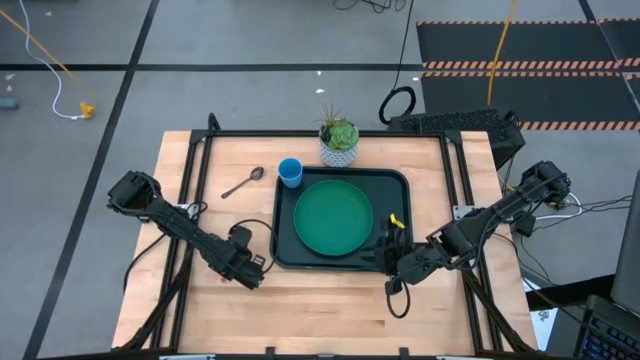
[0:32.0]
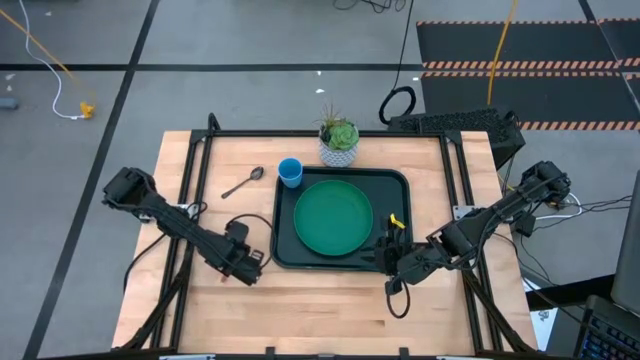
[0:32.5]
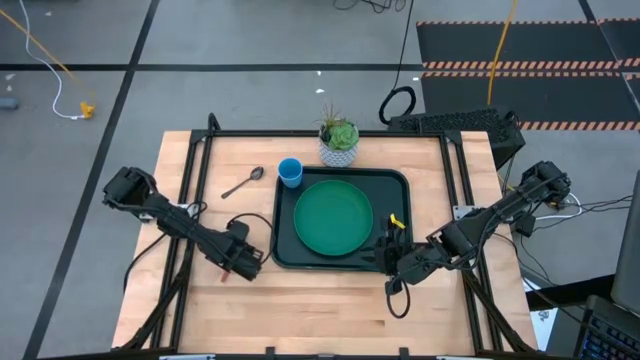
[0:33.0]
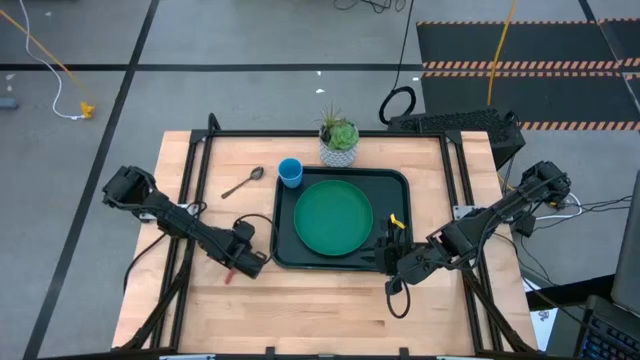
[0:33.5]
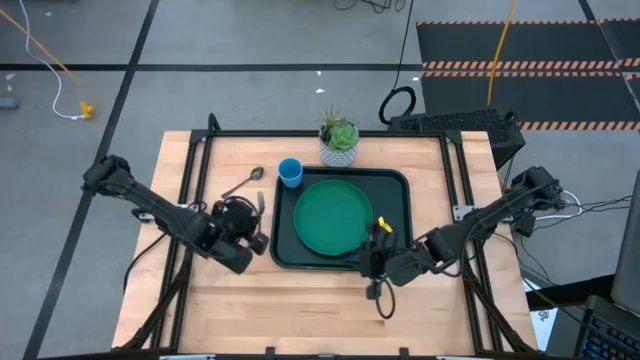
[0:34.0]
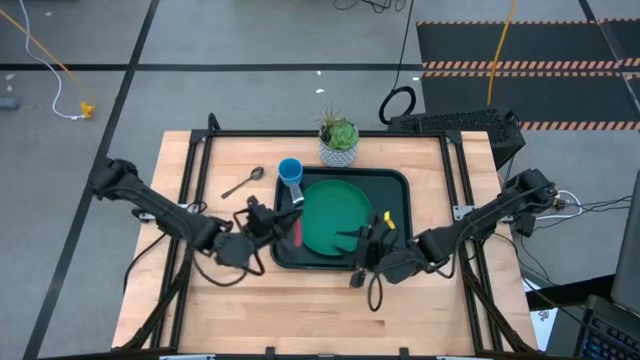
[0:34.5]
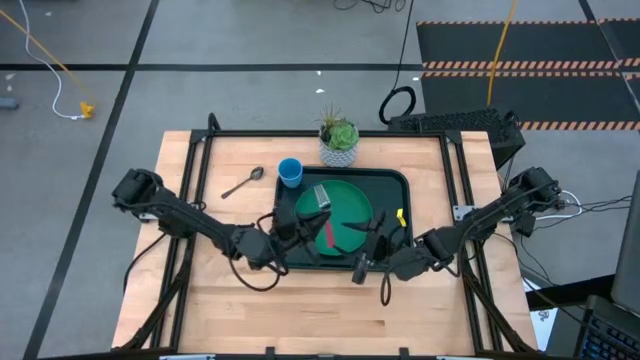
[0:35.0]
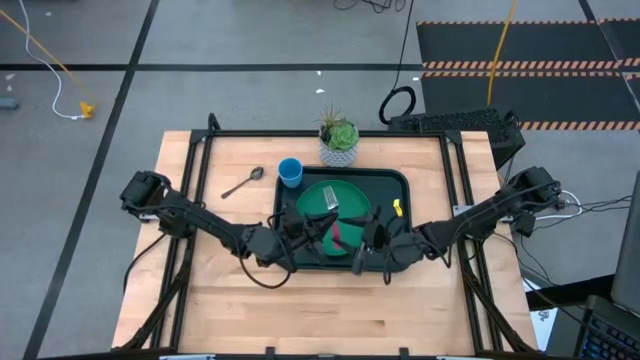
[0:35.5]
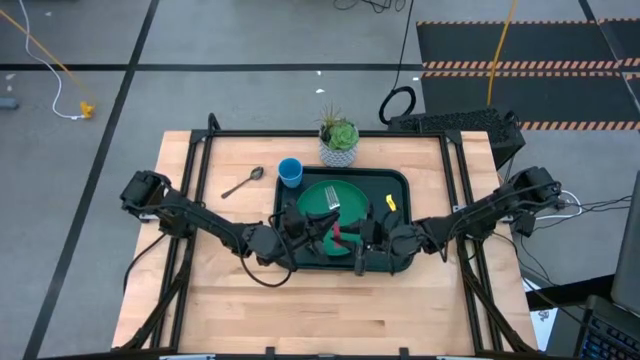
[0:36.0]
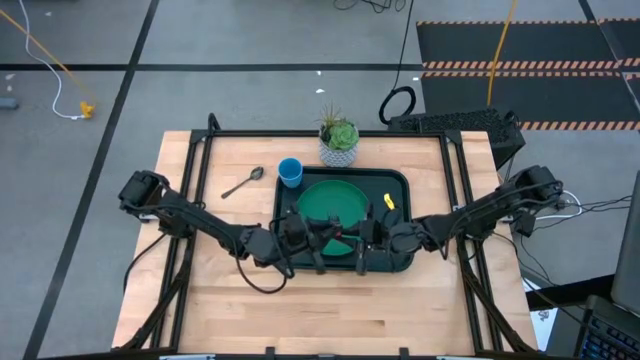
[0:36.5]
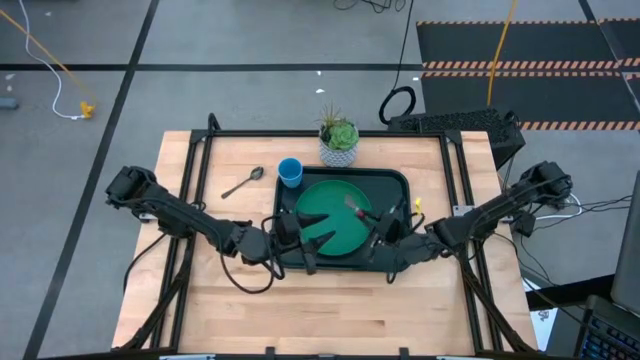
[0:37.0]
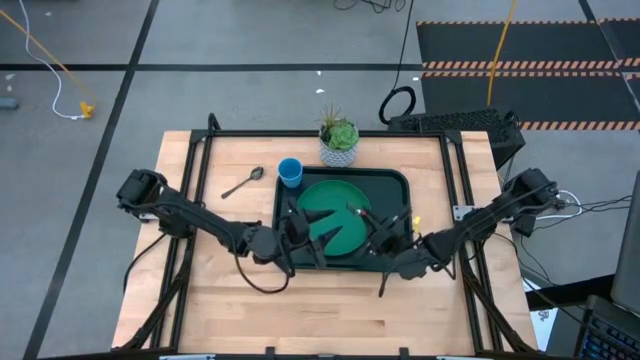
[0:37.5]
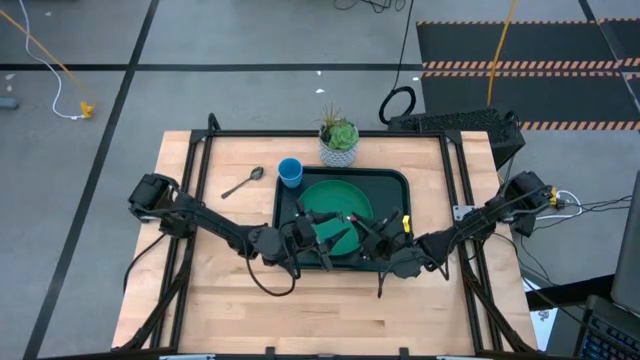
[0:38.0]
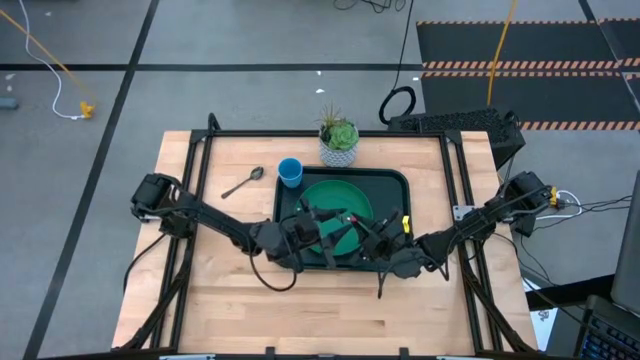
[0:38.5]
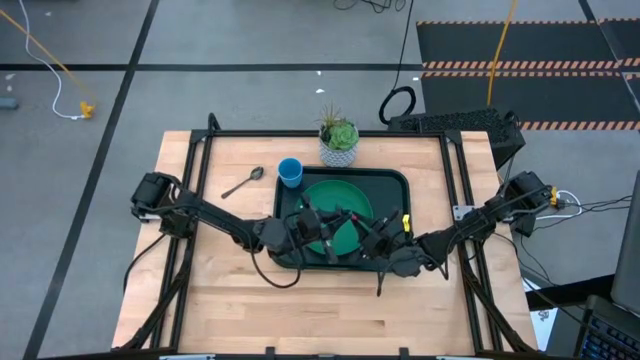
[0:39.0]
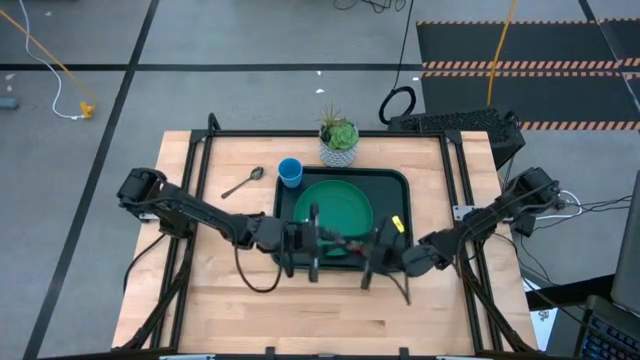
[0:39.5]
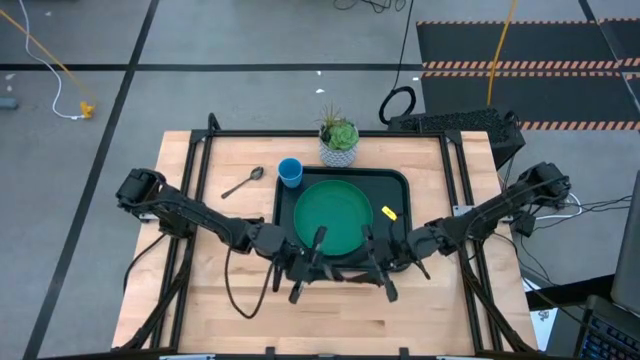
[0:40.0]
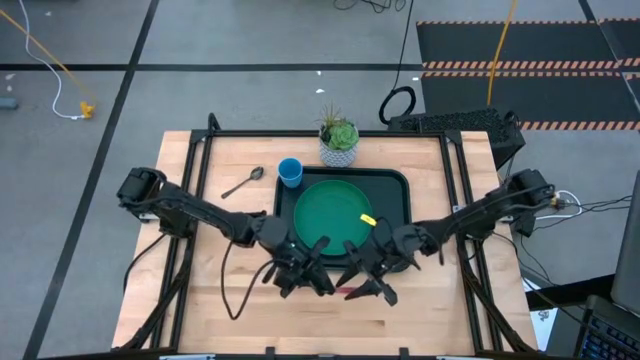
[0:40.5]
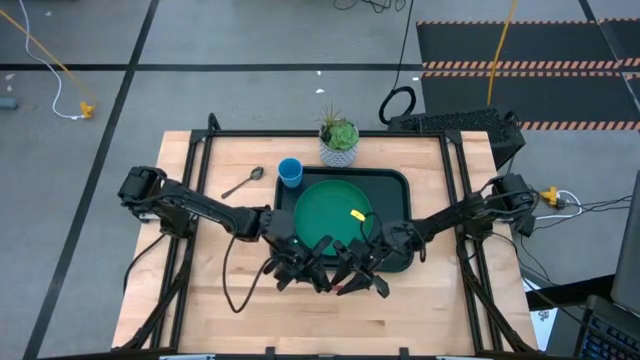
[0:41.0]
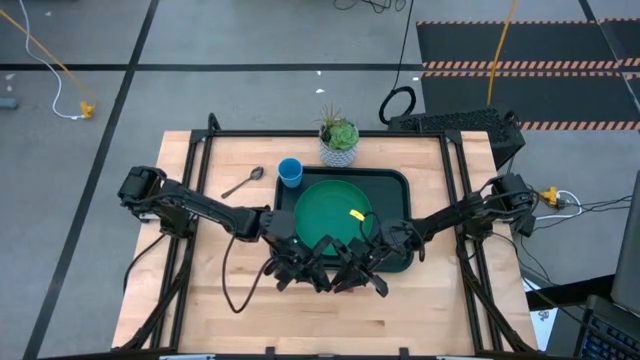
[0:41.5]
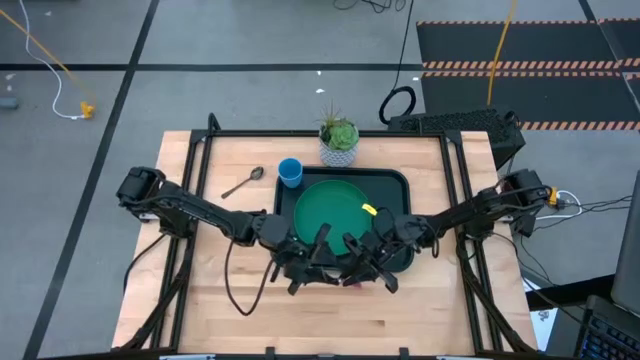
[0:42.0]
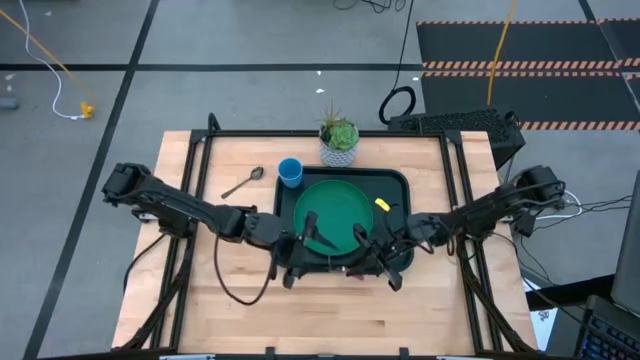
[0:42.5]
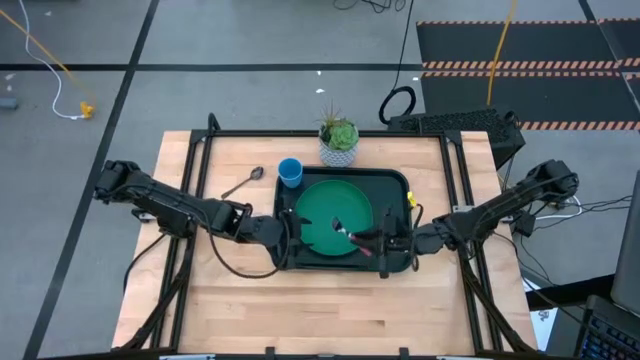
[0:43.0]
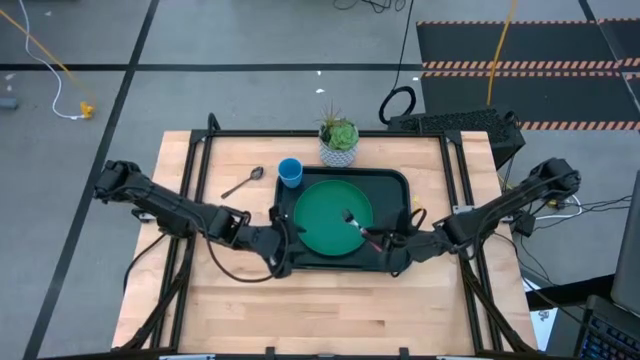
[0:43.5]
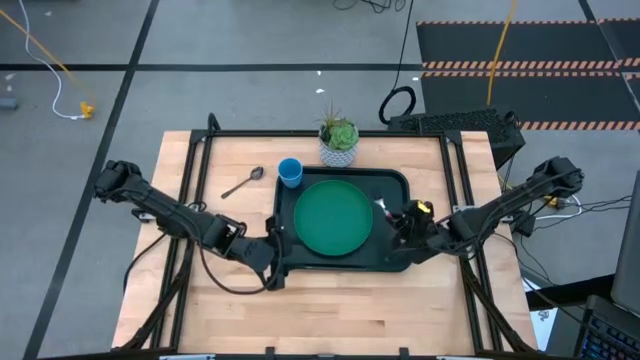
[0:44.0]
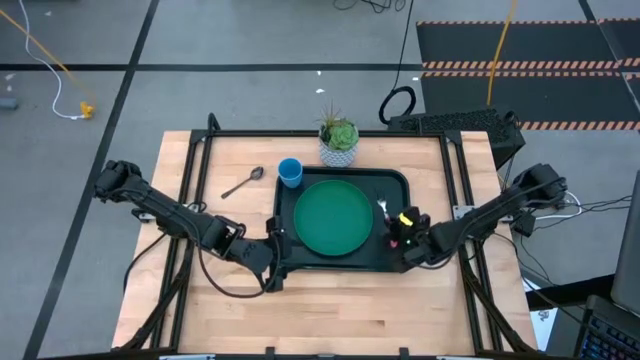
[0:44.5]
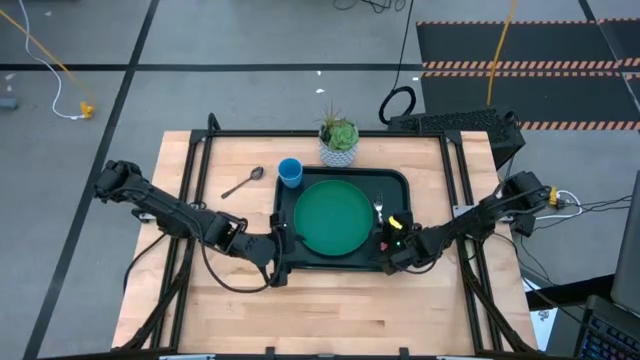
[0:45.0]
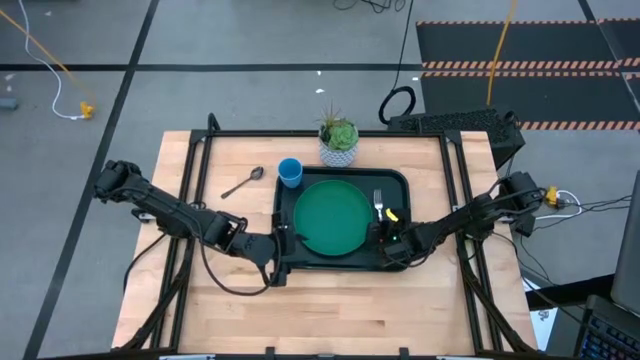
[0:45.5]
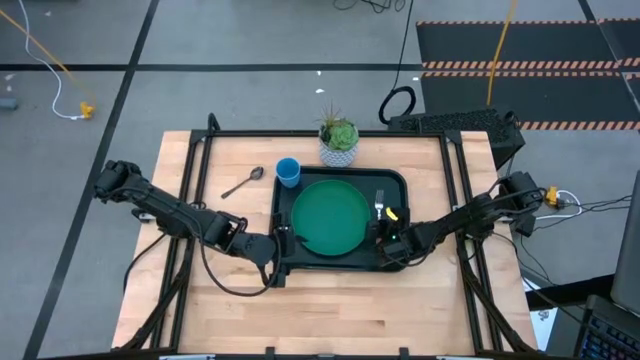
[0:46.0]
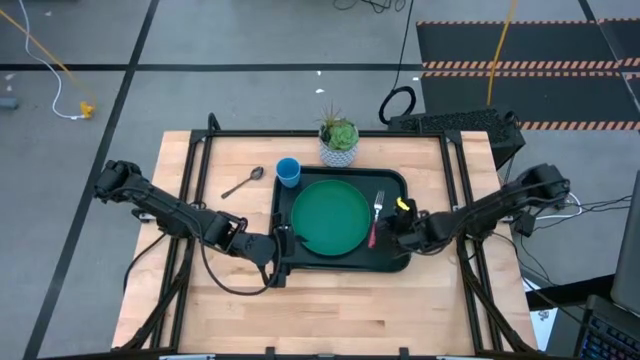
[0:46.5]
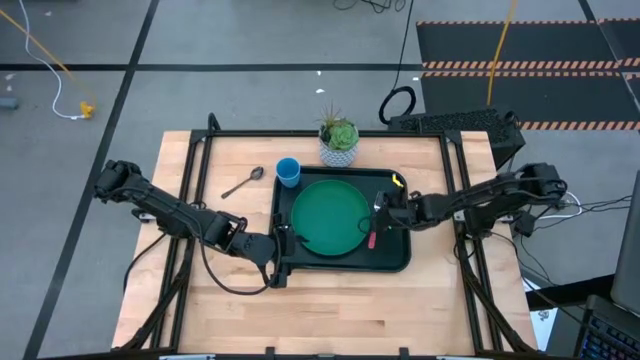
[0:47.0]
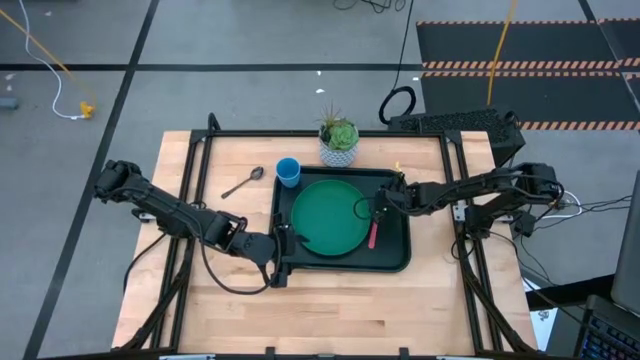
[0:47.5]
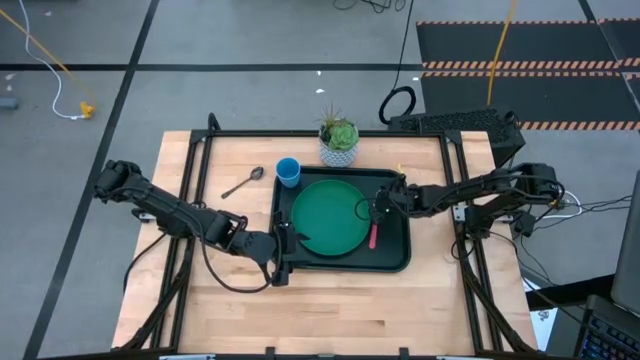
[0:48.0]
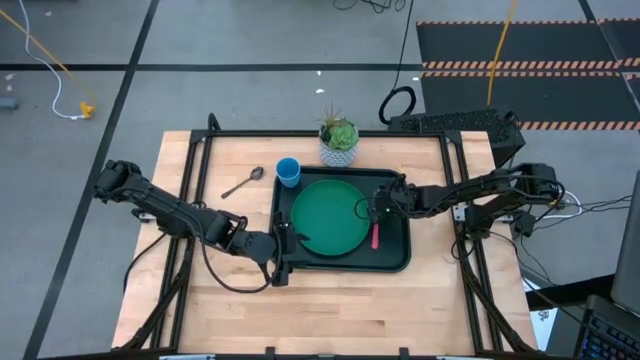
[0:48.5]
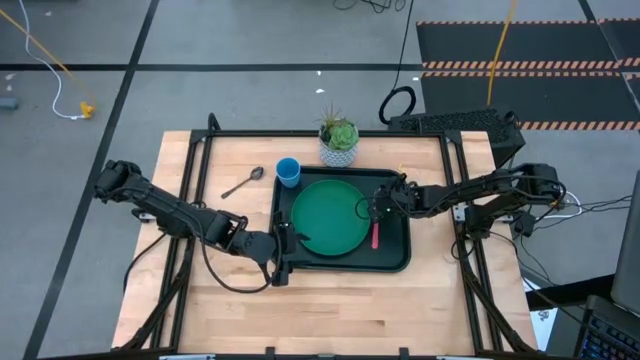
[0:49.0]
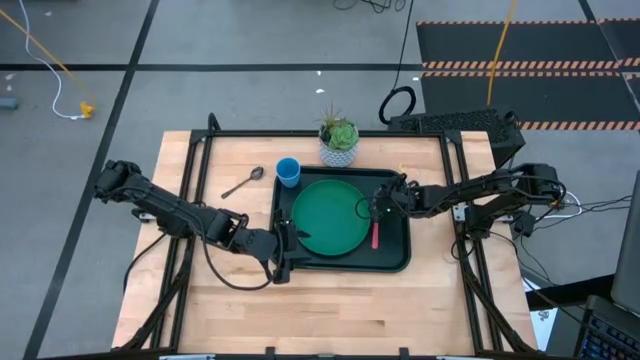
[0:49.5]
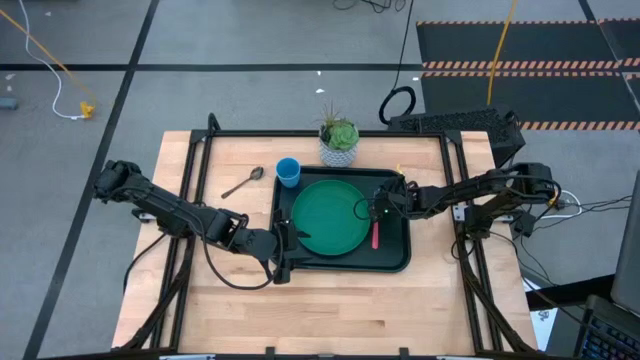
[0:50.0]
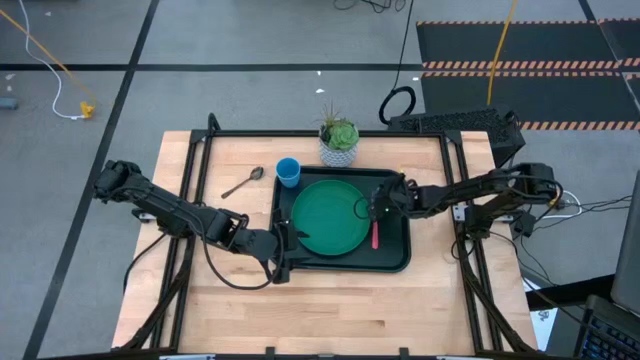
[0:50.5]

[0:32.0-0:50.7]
Task: Pick and place plate/cup/fork/spoon on tray
Put the pink fork to the right side of the green plate on the black serving tray

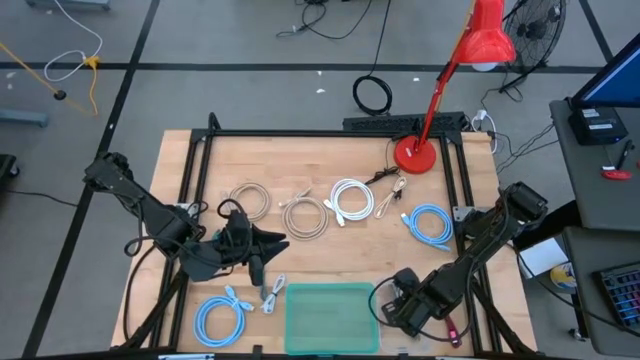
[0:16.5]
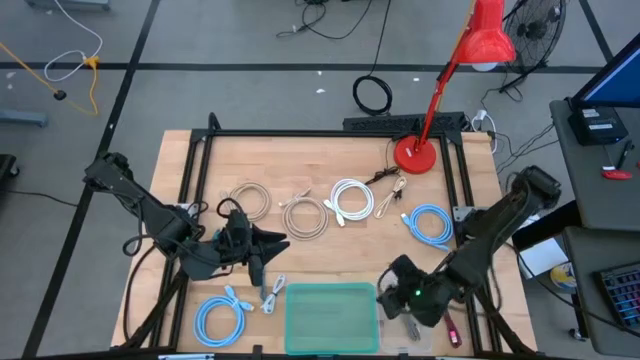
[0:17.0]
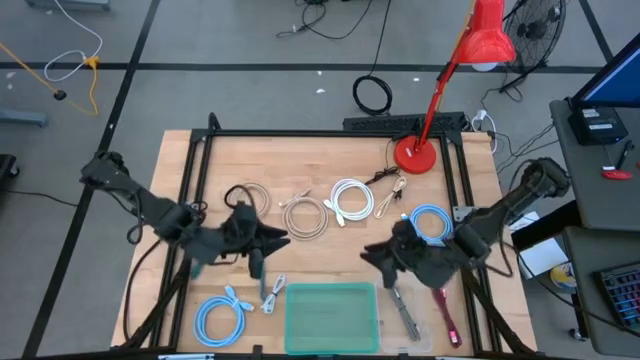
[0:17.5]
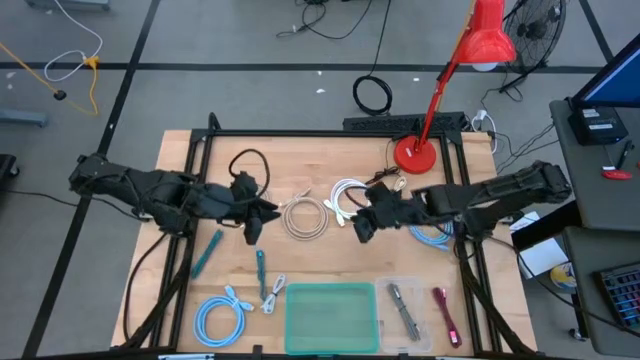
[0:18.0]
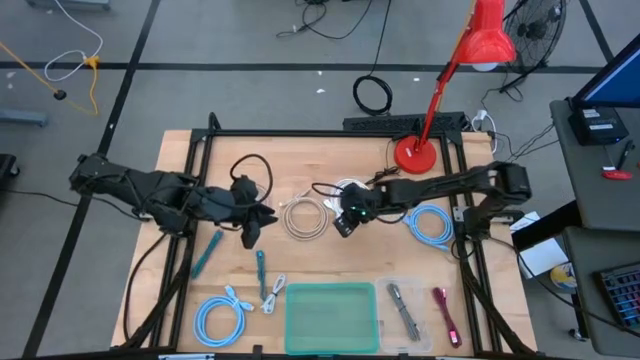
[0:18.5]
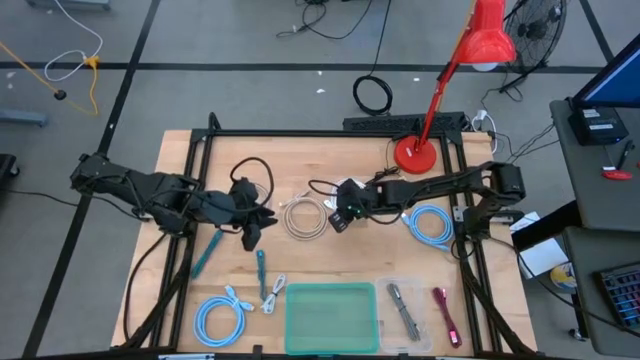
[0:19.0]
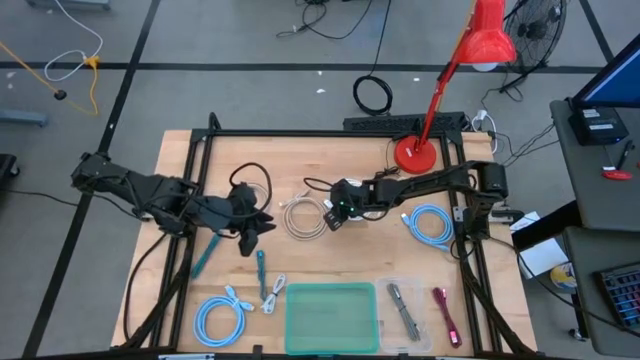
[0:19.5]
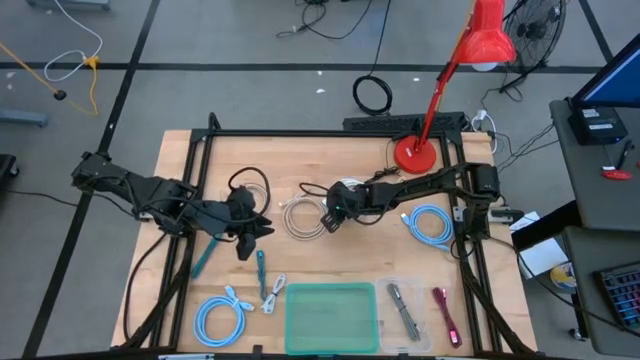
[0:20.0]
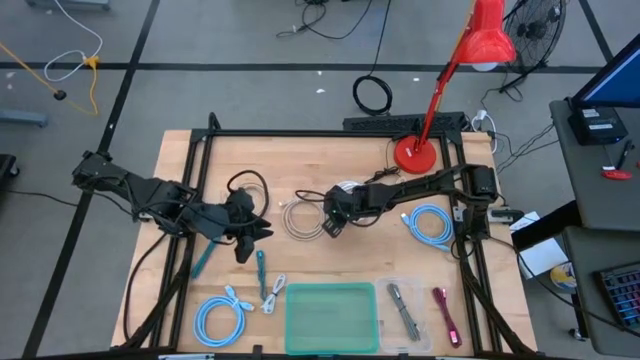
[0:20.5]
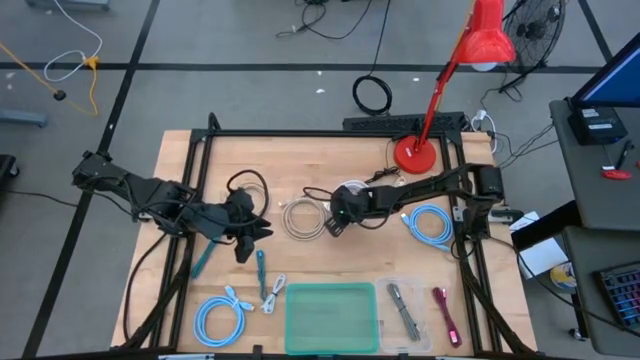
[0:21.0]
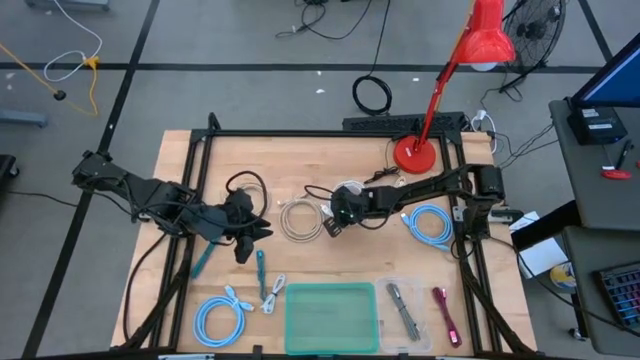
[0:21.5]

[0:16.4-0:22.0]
Task: Pick & Place USB Port
Put the white transparent hdmi cable into the green bin
